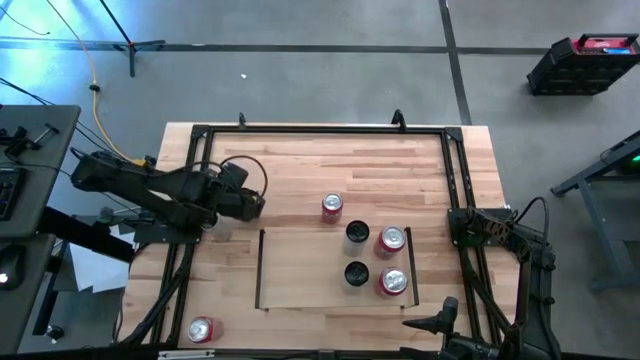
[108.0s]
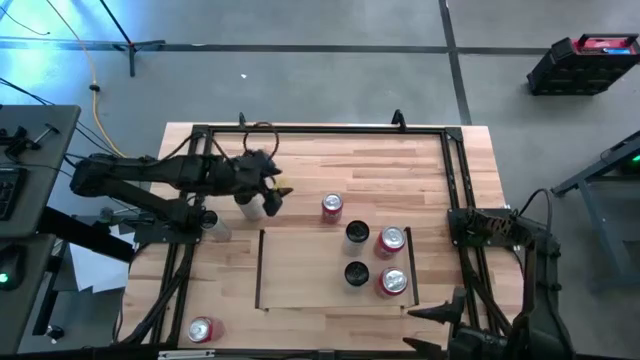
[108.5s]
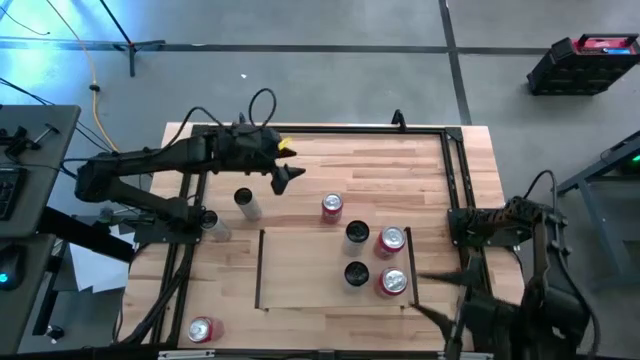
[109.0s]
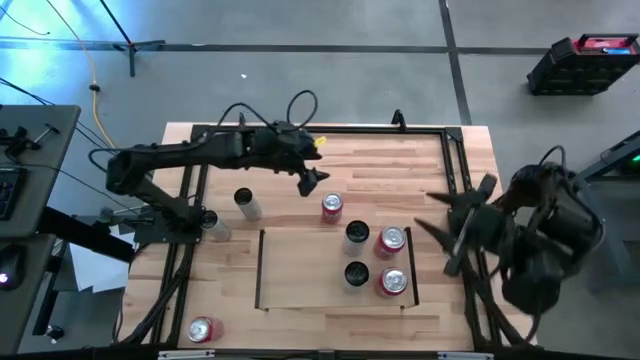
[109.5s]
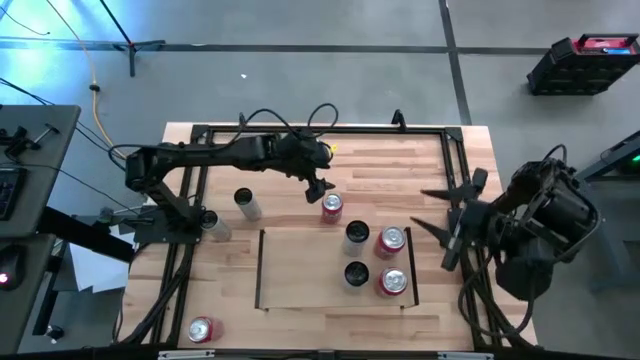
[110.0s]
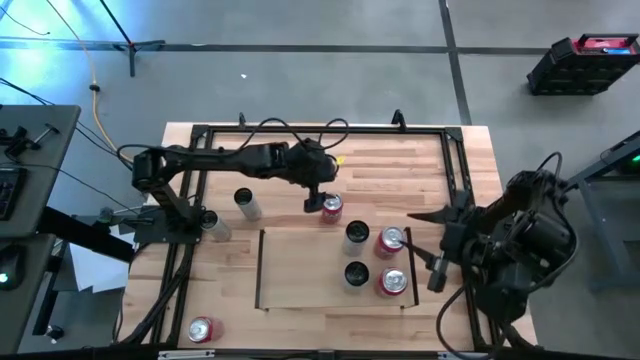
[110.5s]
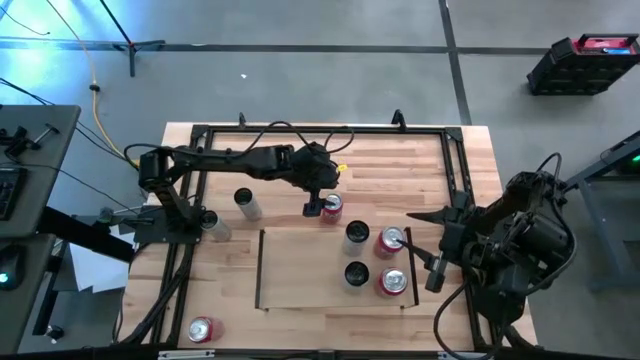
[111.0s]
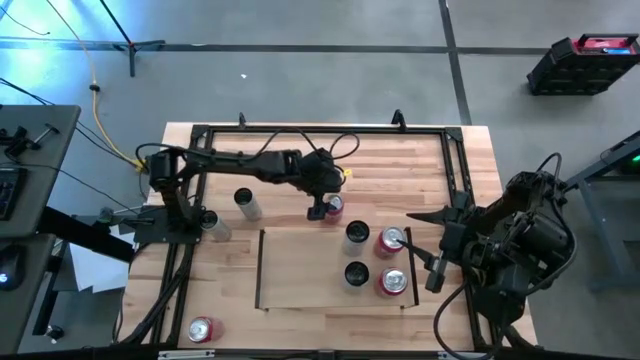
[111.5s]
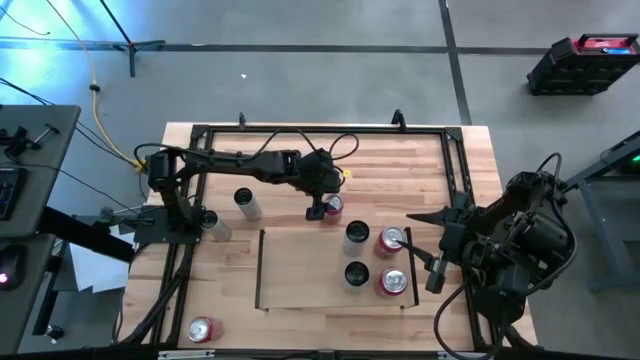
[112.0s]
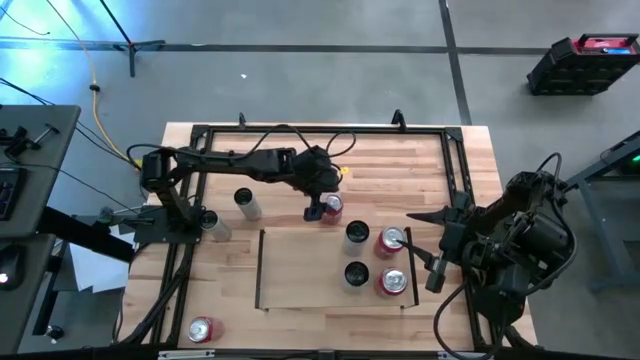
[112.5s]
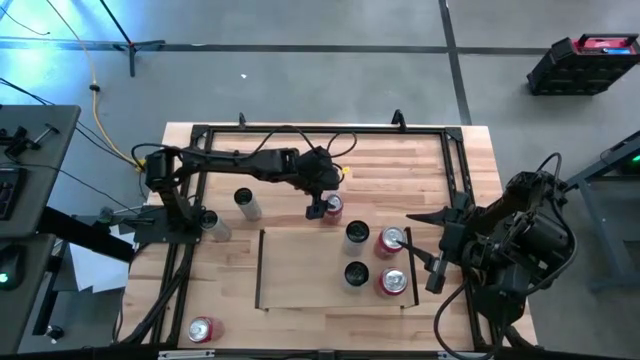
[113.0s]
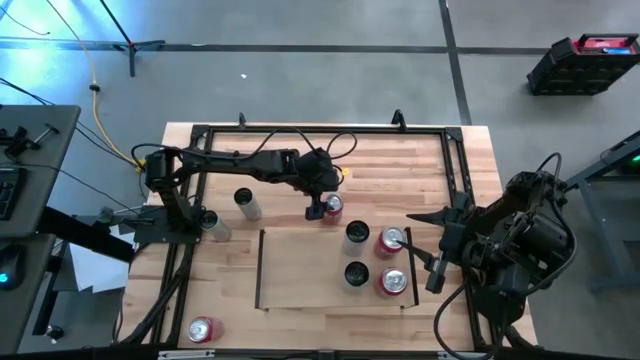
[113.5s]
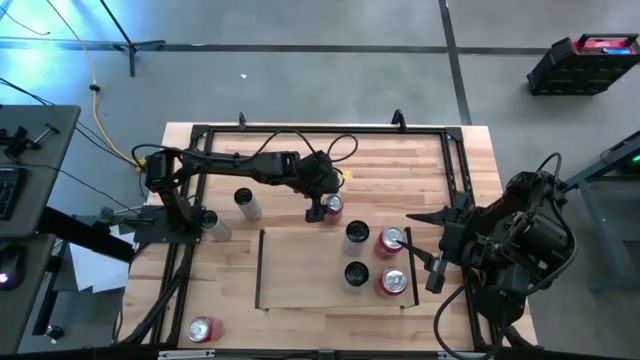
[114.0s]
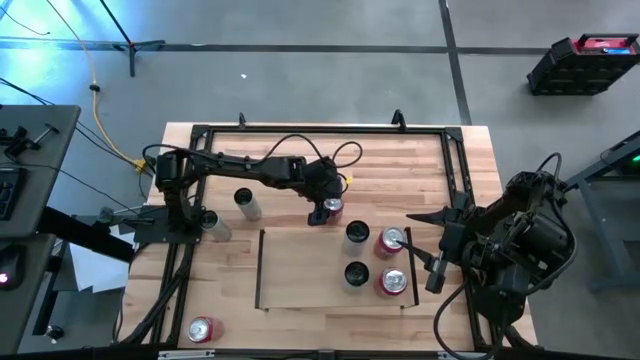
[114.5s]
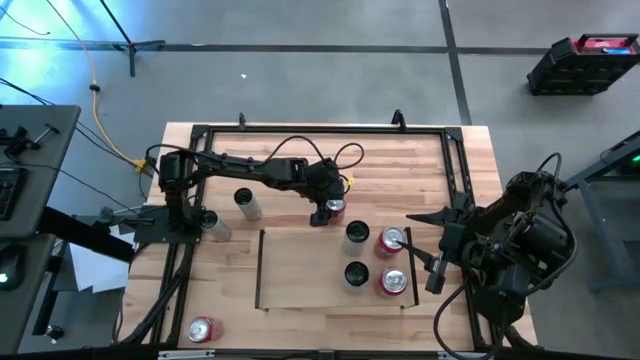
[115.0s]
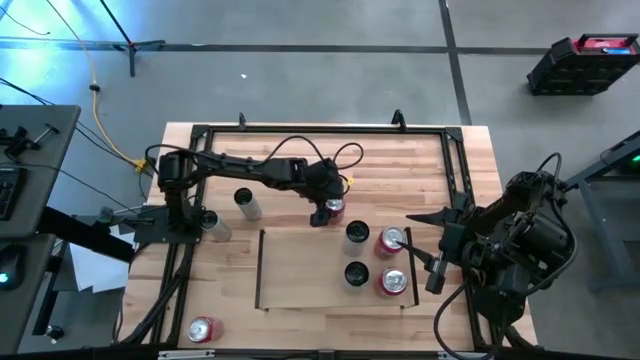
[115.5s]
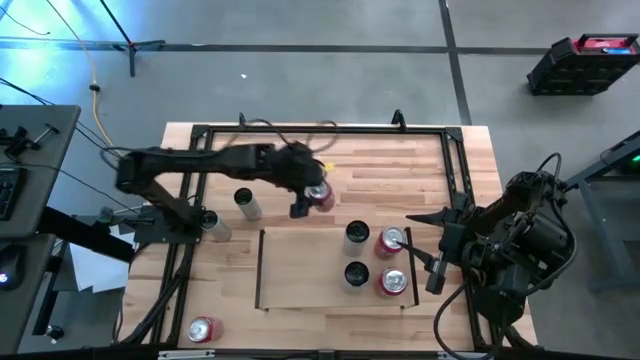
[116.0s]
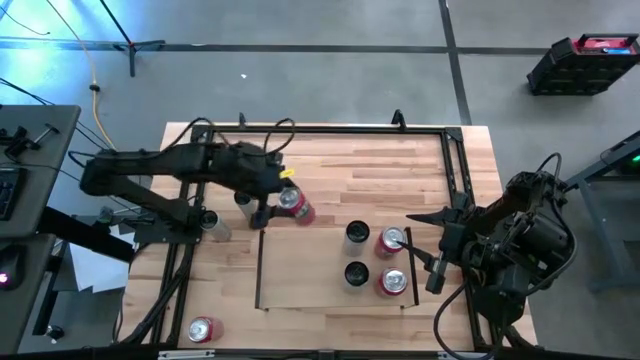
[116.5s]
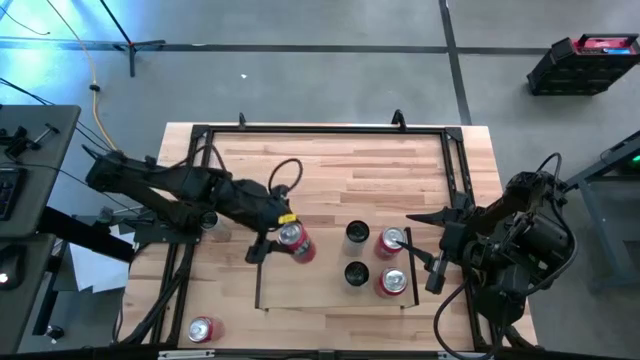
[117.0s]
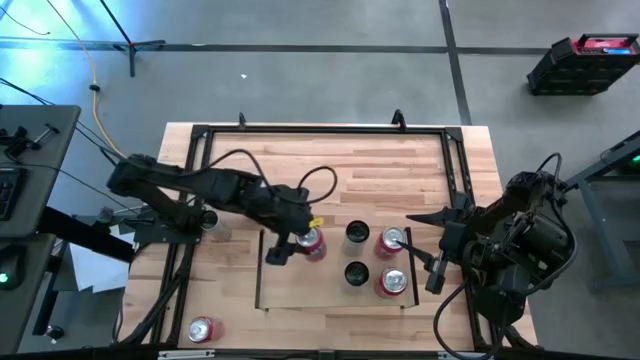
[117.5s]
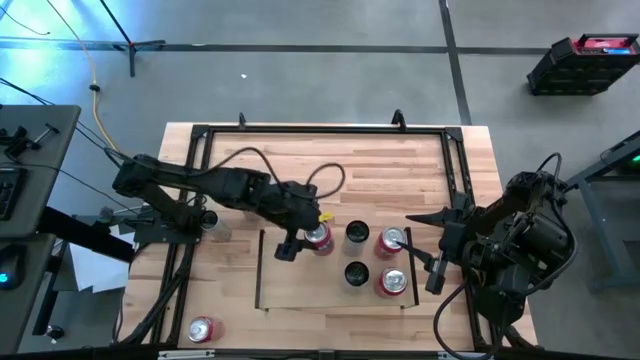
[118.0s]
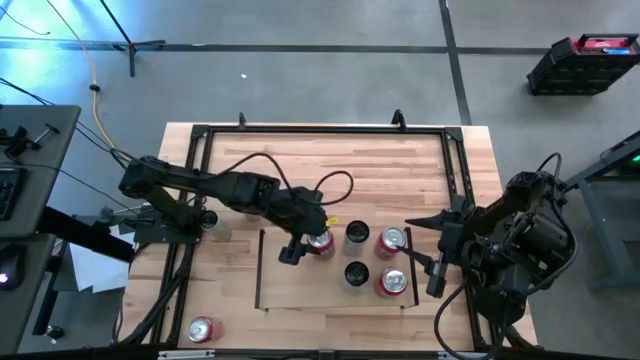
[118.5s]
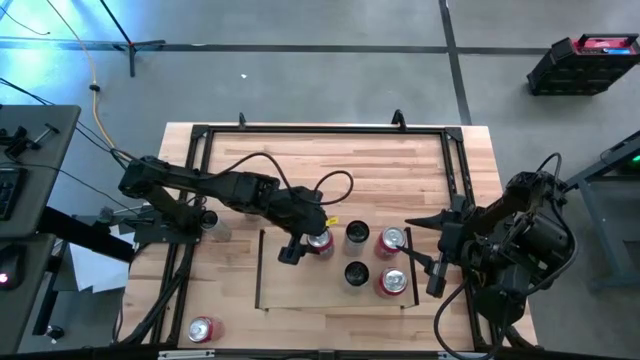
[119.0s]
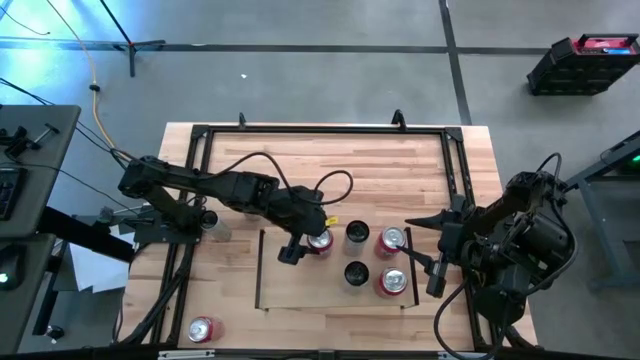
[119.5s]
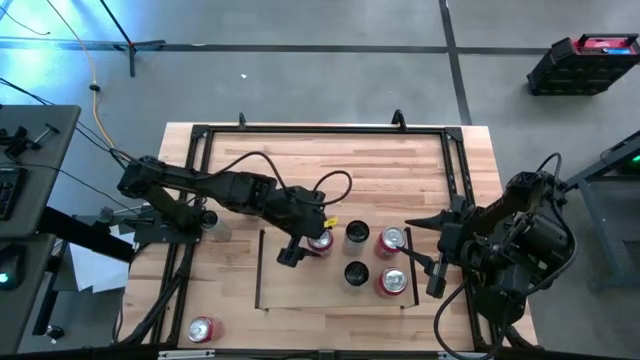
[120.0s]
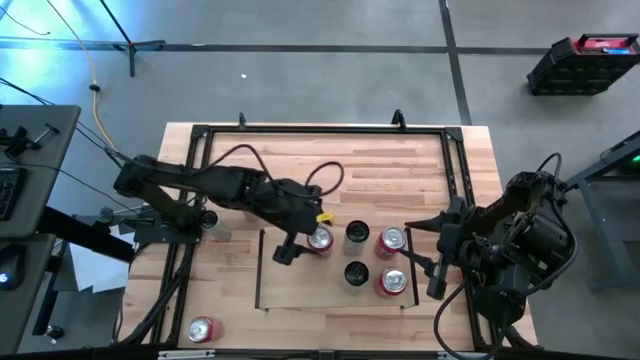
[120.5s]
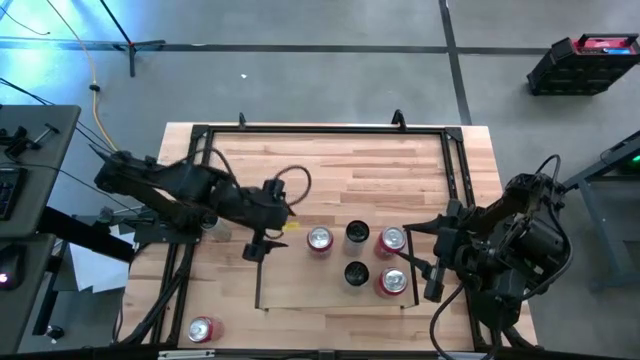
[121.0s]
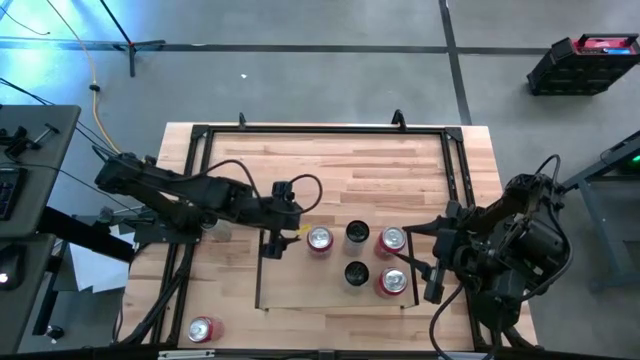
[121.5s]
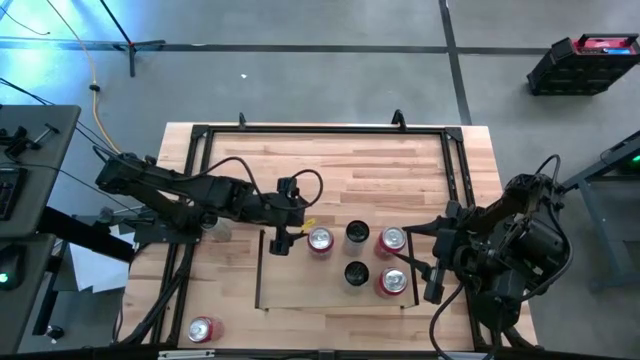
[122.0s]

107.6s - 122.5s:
Task: Place canned beverage on shelf
Put the top red soda can on the shelf
